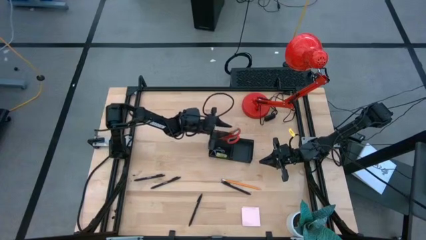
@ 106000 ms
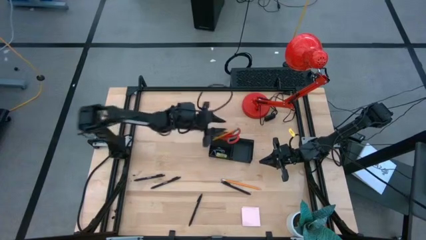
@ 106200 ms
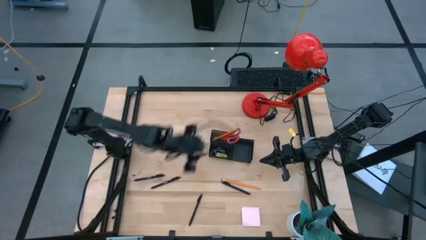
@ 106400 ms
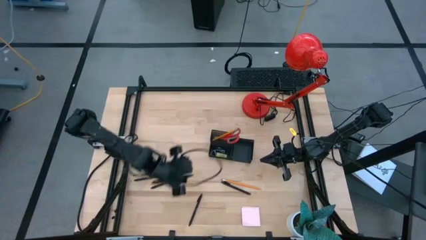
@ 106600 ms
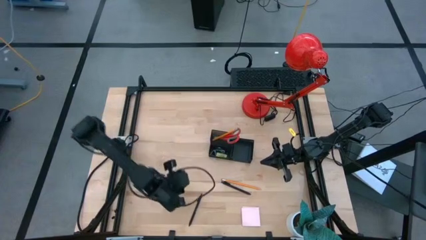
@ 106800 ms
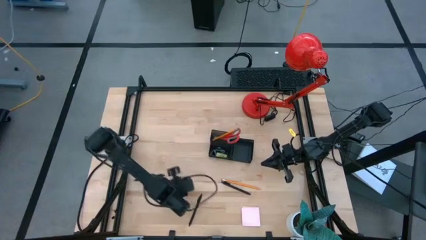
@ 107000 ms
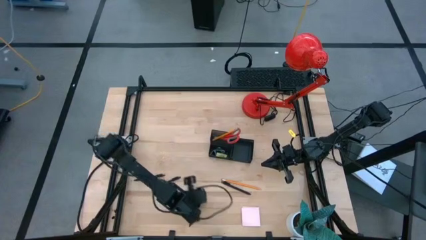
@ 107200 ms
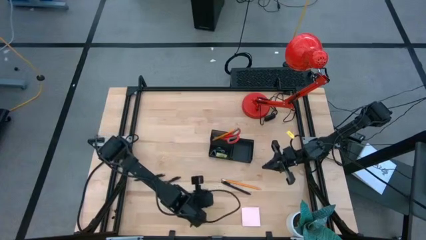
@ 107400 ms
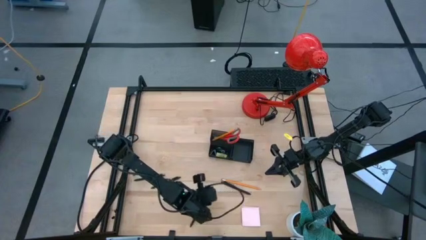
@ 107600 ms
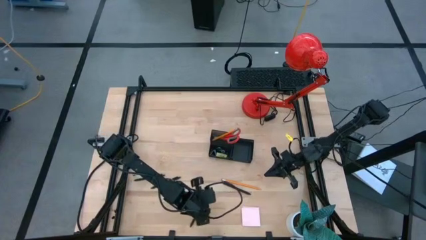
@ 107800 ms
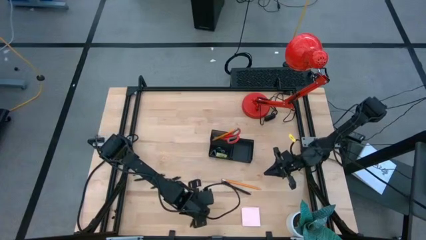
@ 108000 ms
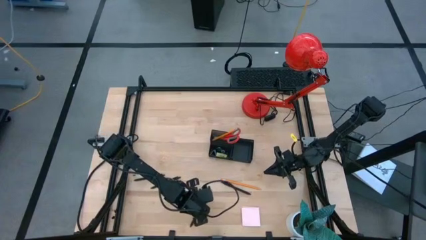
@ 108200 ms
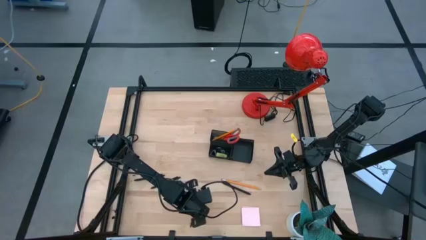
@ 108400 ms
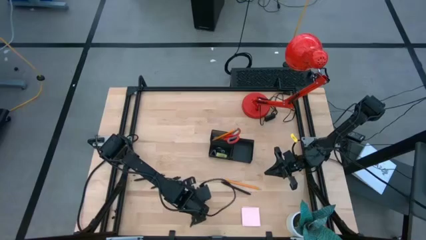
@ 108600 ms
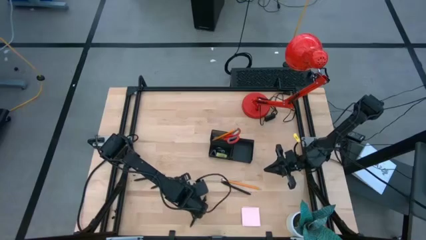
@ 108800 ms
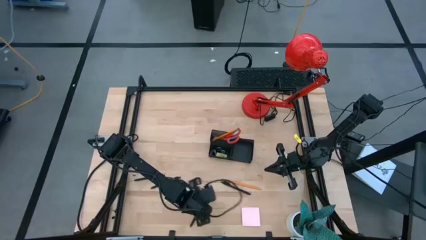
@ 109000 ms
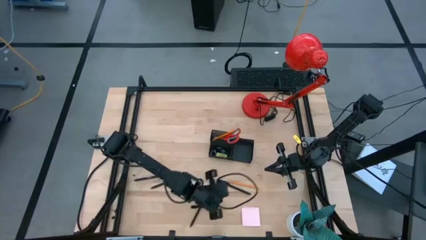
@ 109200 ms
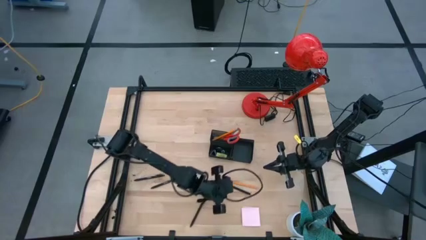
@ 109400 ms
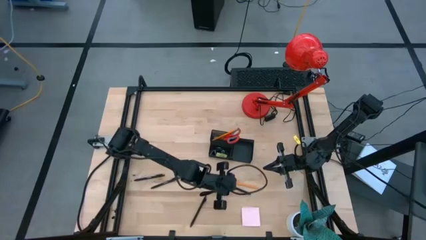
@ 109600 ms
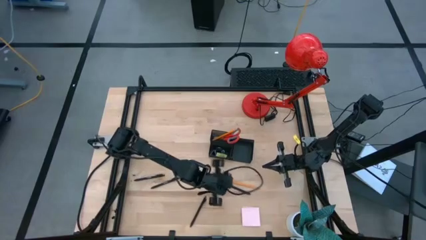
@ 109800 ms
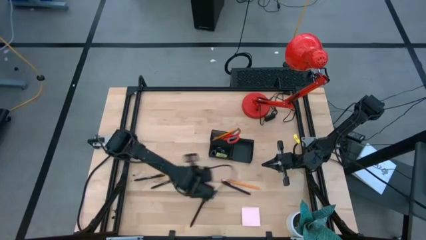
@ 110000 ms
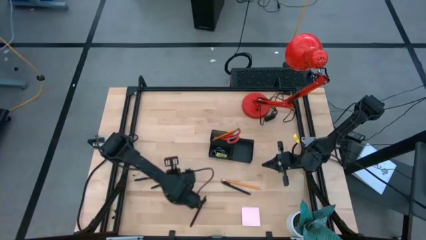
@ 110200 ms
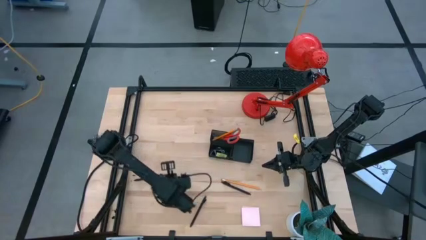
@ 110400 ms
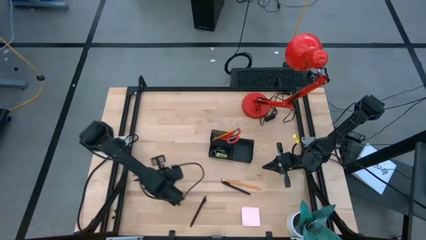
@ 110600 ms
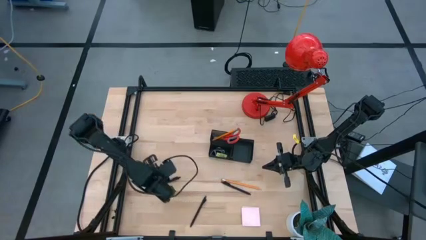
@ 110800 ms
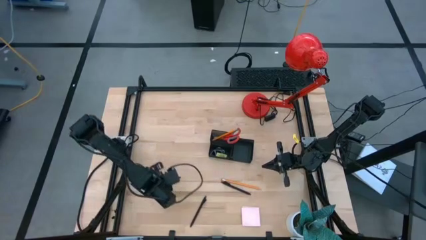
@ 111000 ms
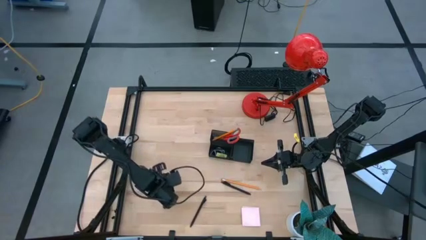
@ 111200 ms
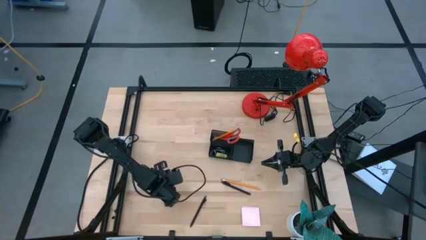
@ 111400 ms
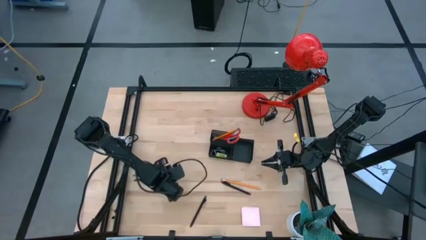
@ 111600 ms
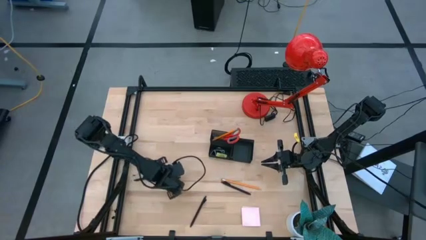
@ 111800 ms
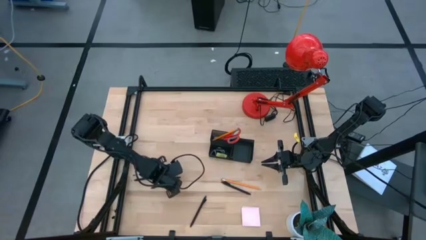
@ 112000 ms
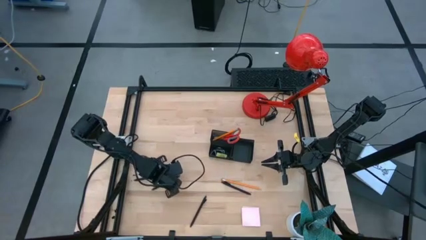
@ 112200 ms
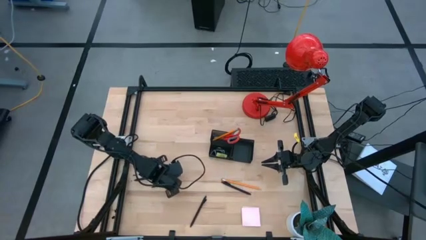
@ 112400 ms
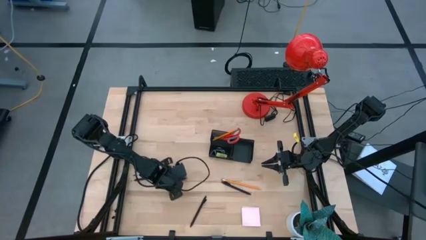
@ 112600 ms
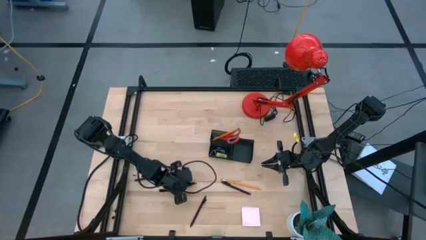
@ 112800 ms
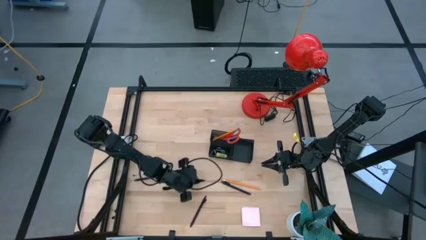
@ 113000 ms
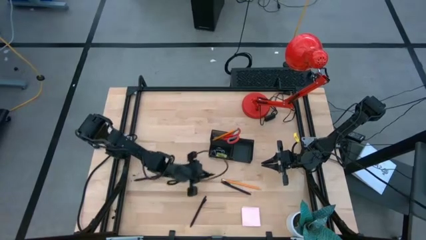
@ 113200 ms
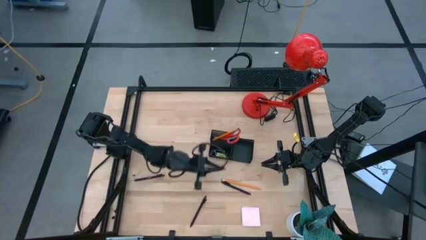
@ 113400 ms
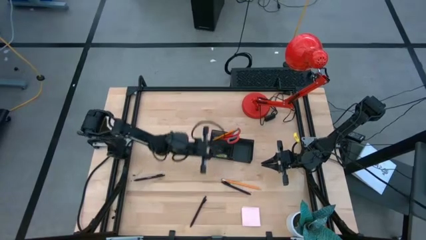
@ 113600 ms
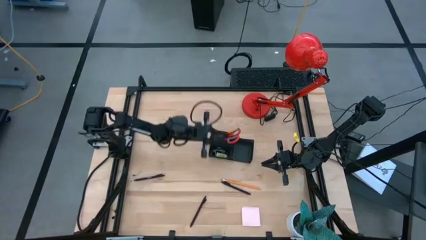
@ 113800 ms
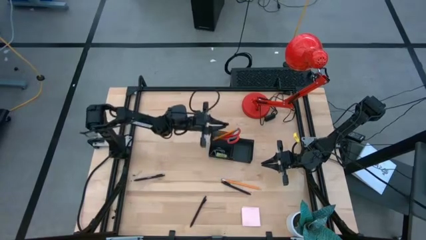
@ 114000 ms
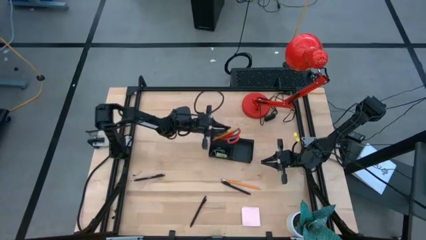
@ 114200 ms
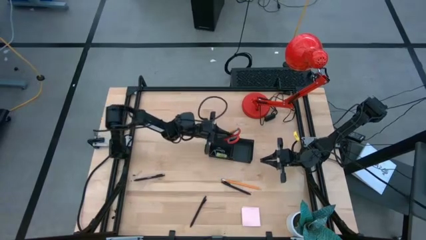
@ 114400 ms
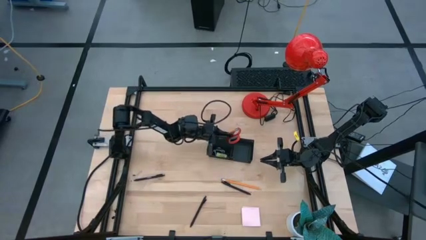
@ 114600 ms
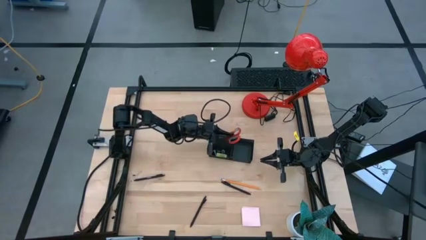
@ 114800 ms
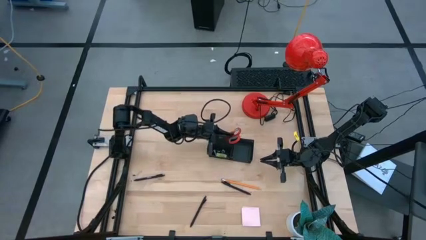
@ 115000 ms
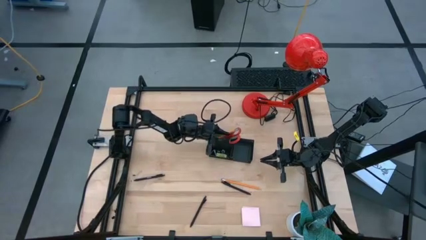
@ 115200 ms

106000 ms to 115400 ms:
Task: Pick and place office supplies into organizer
Put the black pen into the black desk organizer

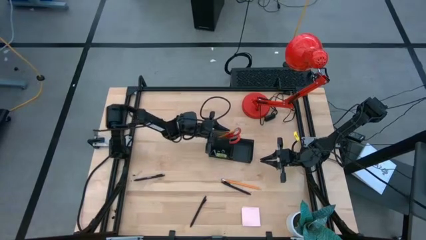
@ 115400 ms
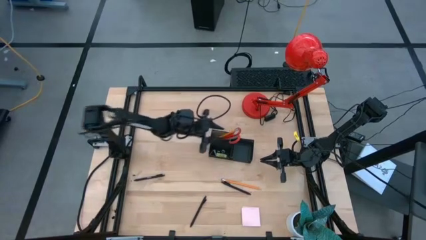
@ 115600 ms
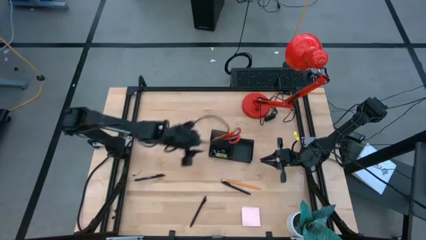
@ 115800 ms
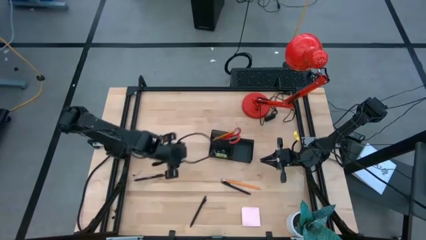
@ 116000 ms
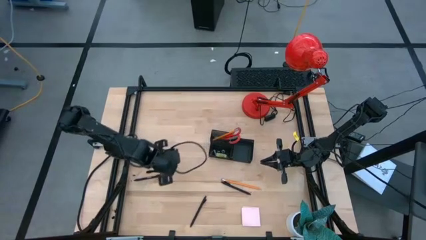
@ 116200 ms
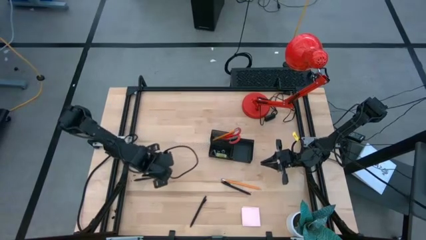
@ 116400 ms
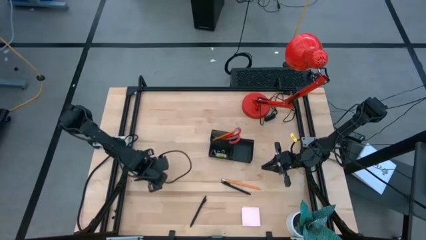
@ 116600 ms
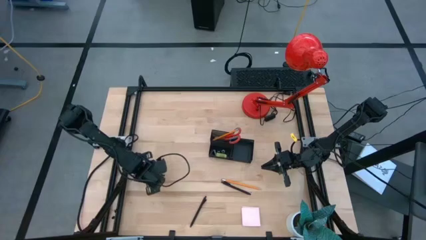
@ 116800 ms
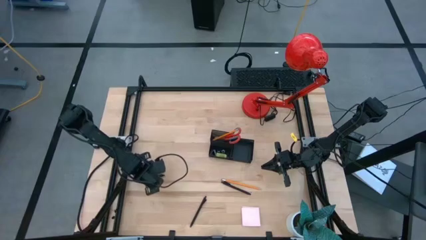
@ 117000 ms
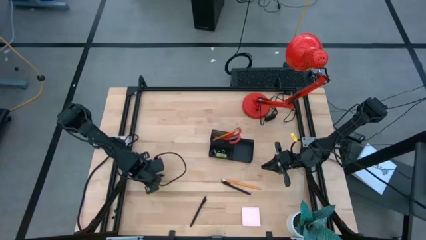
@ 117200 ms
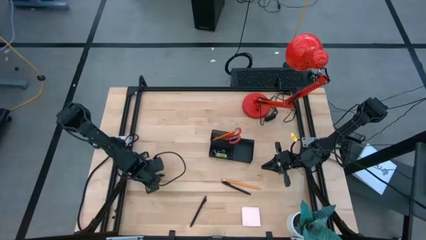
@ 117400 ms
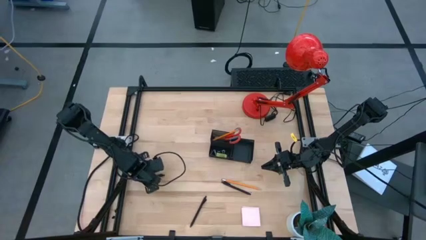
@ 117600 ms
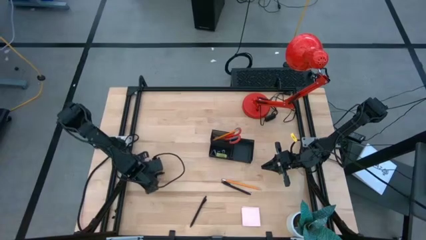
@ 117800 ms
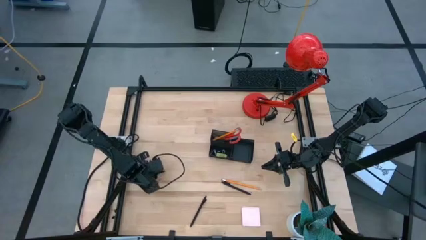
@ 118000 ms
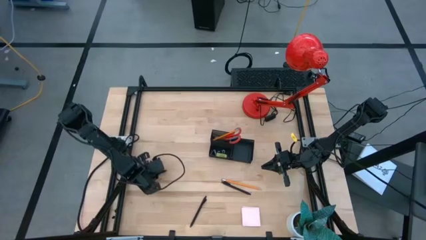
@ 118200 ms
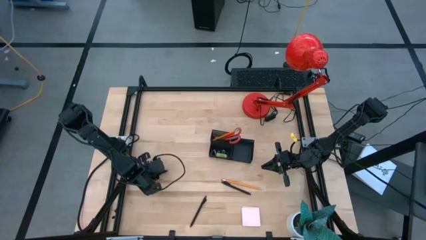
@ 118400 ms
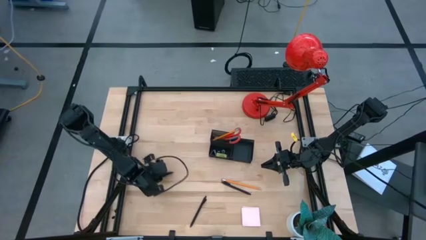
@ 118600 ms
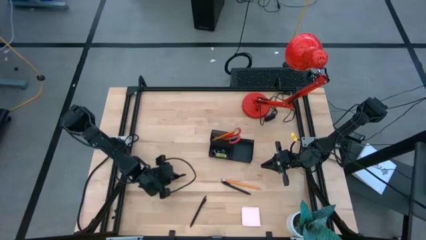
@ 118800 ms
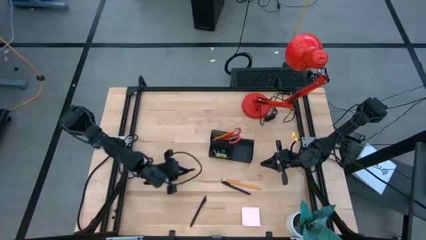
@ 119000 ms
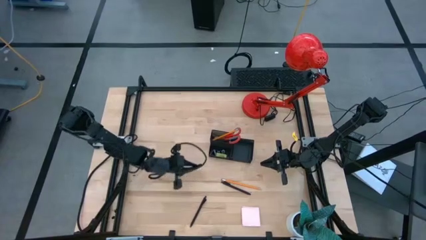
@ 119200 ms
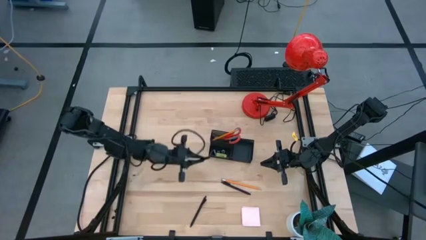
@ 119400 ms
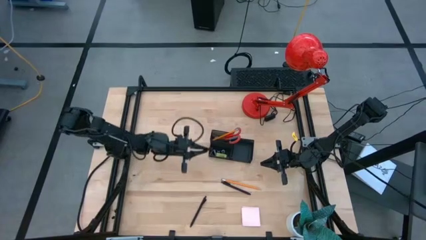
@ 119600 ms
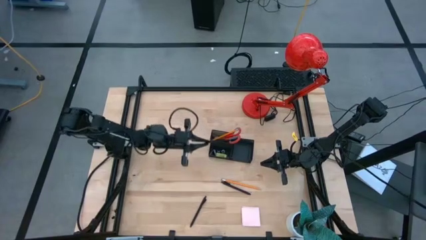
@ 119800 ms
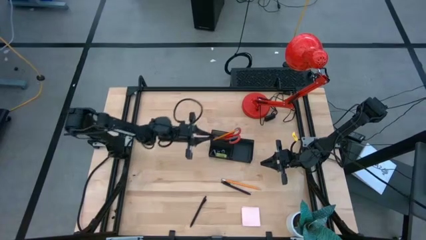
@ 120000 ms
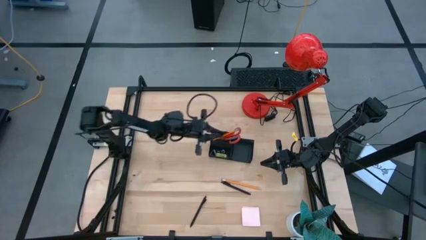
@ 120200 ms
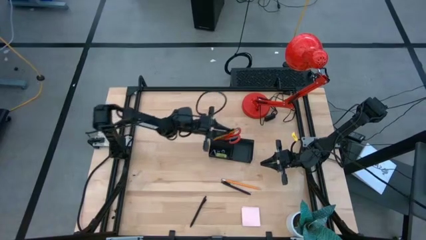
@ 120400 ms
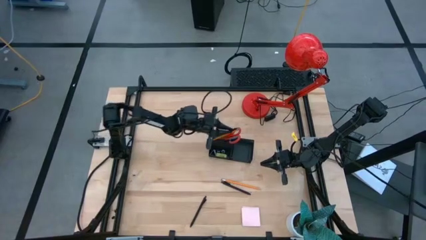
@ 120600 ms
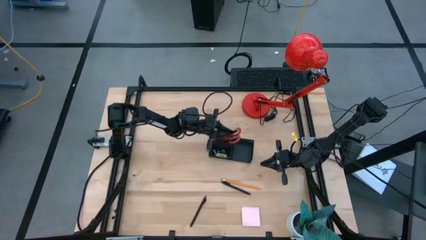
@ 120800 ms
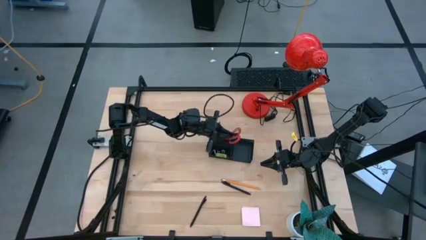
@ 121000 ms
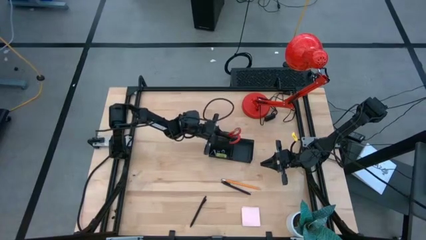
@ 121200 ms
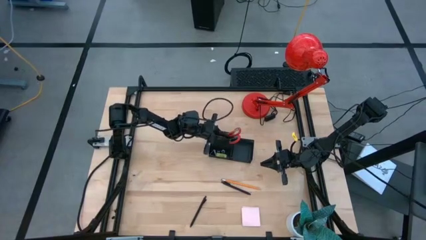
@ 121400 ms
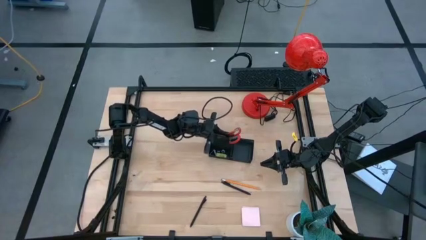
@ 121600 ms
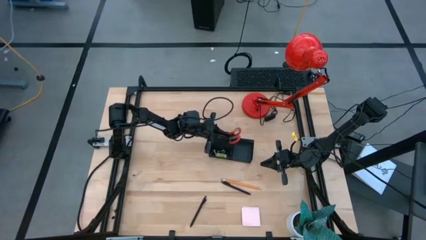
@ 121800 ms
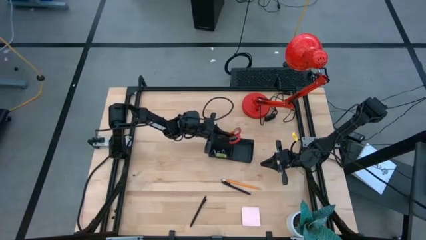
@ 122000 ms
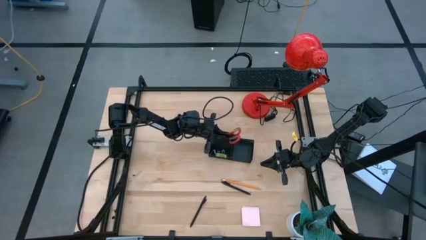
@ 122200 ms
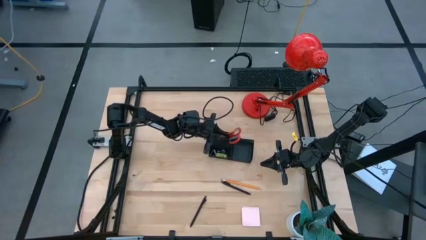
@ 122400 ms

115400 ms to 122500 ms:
Put the black pen into the black desk organizer
